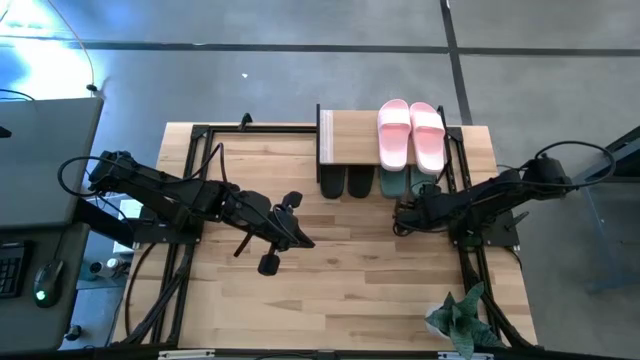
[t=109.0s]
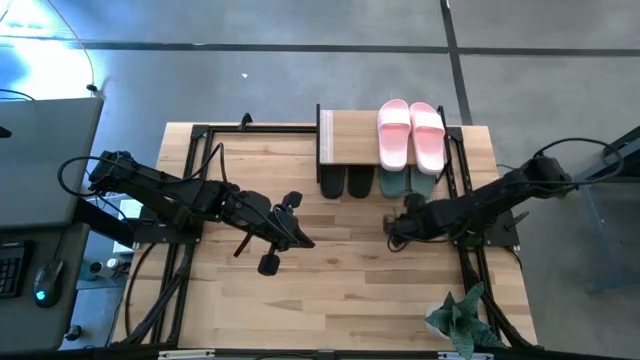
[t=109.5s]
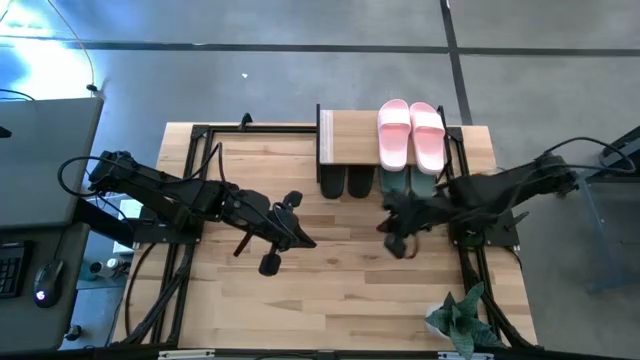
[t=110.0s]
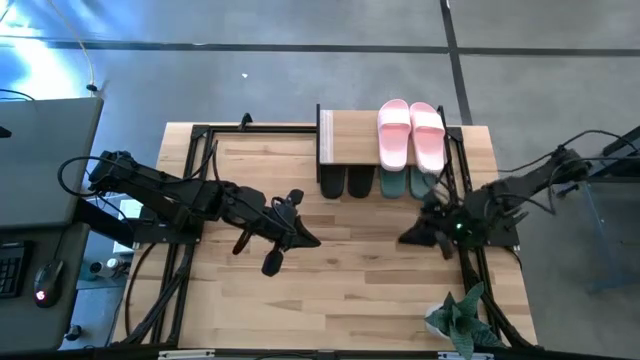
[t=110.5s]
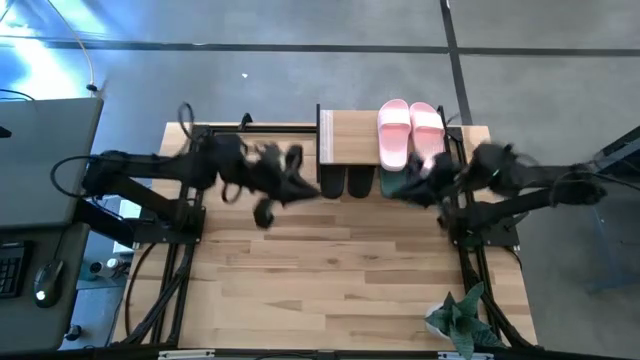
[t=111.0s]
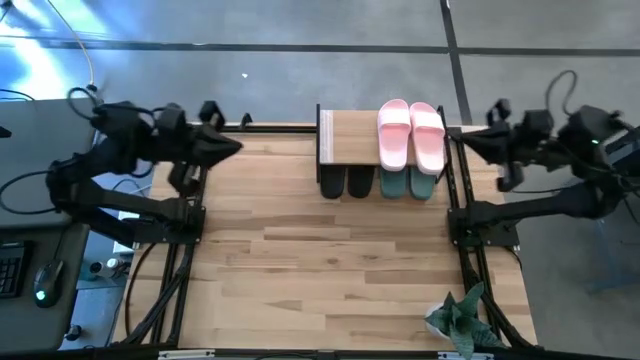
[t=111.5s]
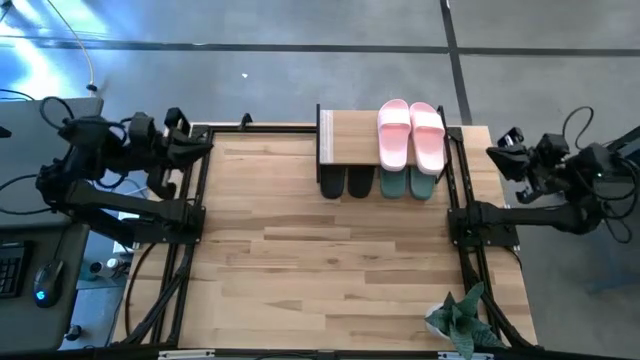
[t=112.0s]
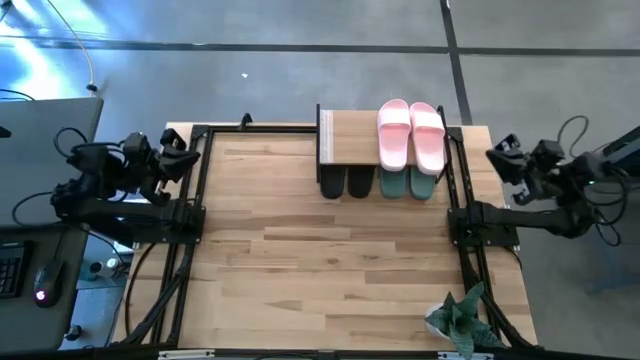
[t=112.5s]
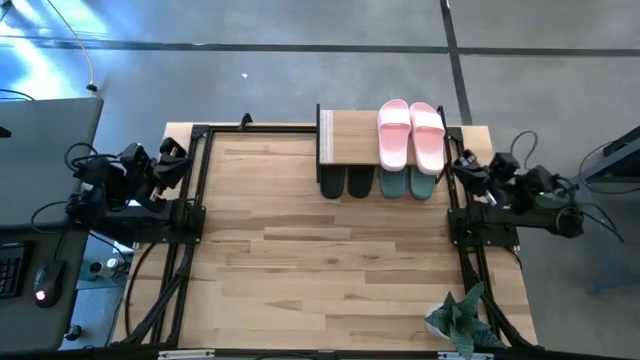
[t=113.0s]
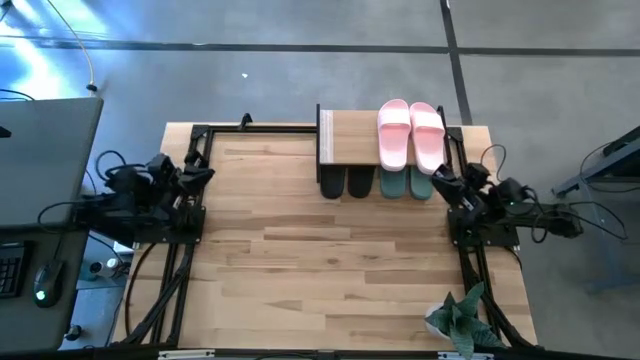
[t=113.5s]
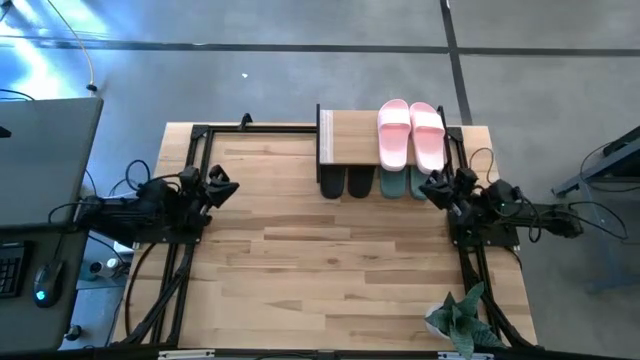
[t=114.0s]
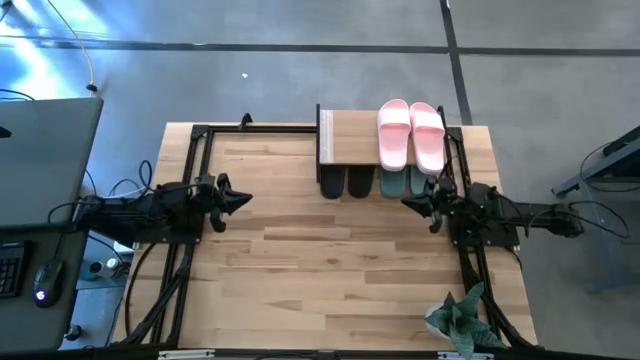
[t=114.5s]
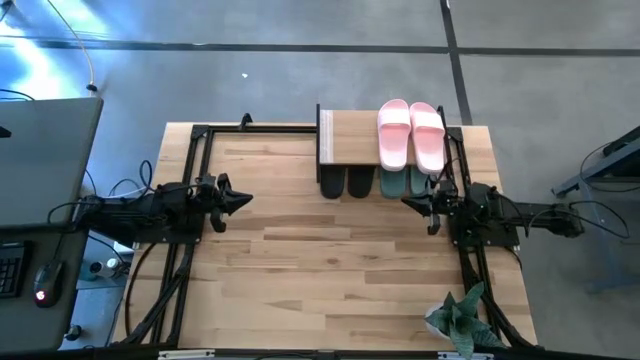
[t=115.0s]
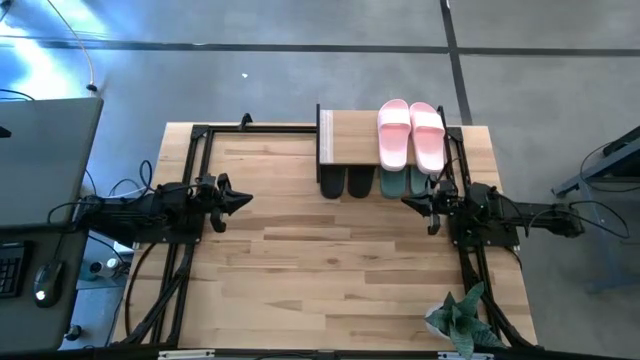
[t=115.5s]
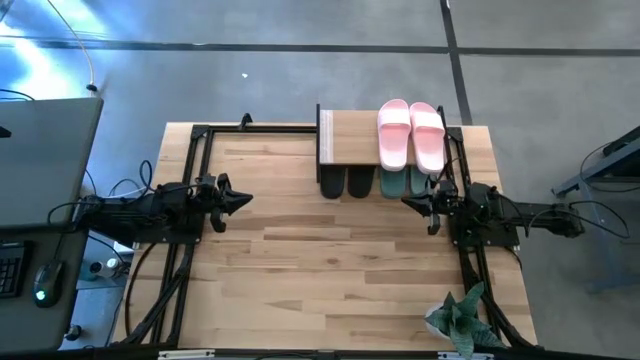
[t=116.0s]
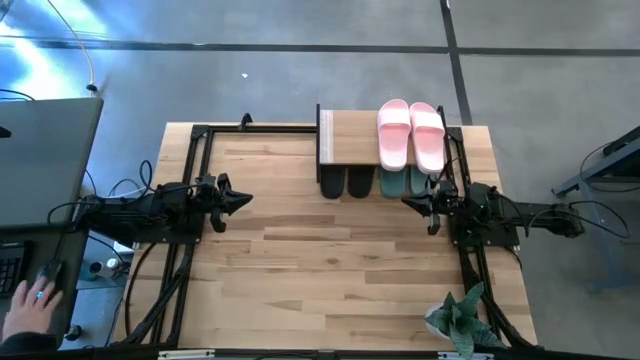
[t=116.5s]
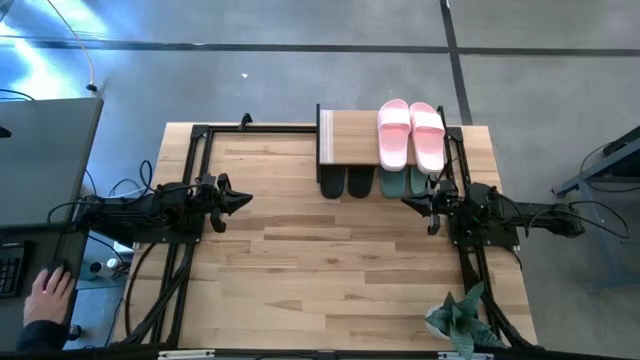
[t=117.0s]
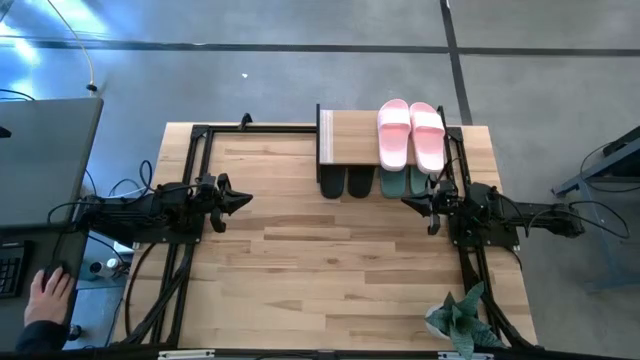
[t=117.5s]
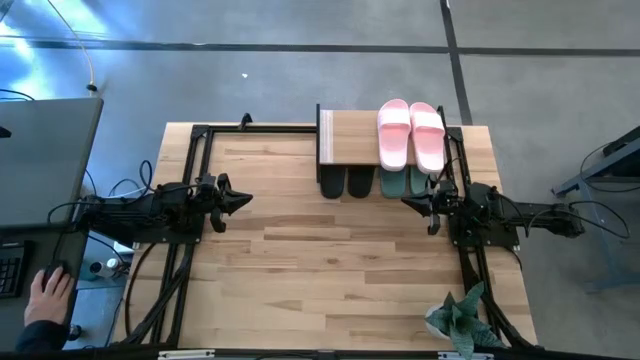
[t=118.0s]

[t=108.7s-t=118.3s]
Task: Pick and place slides into the shelf
Return to Home Position

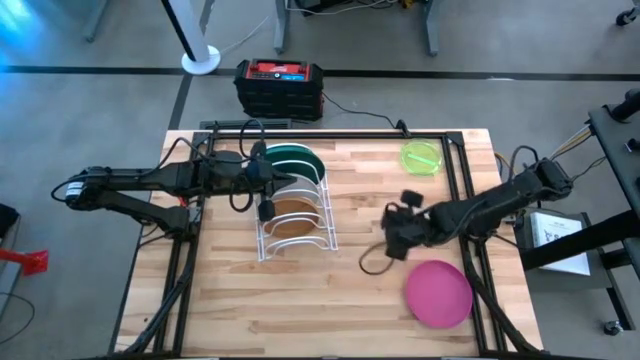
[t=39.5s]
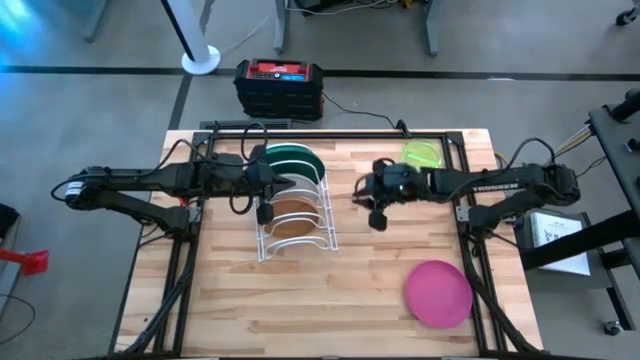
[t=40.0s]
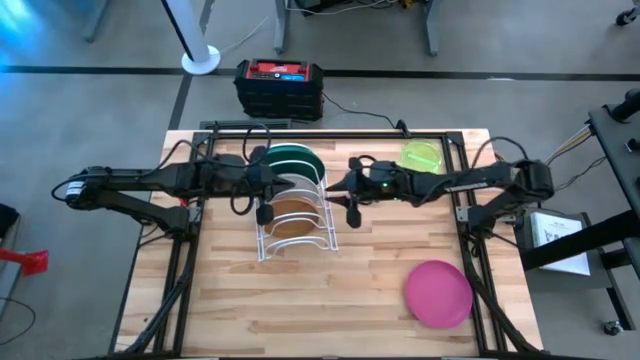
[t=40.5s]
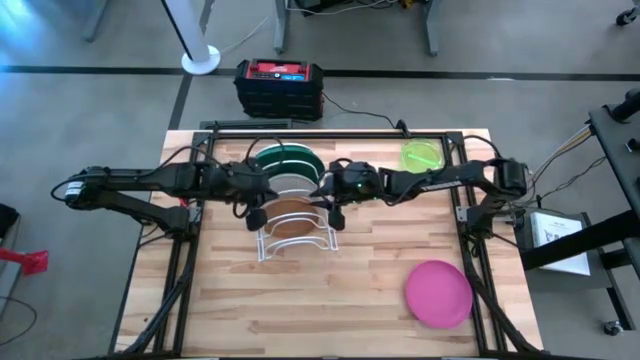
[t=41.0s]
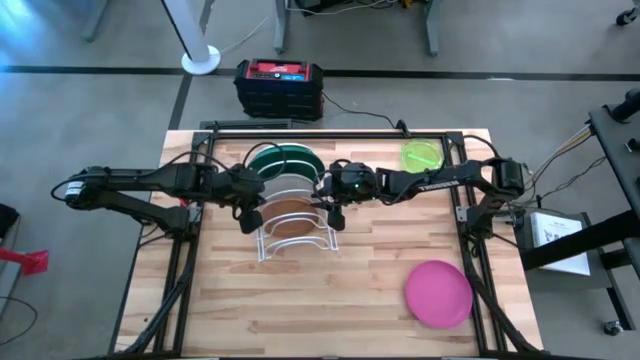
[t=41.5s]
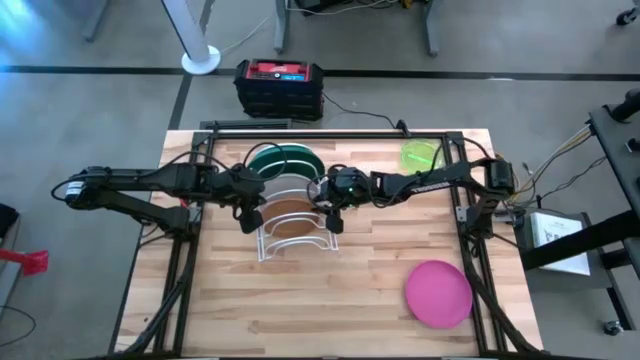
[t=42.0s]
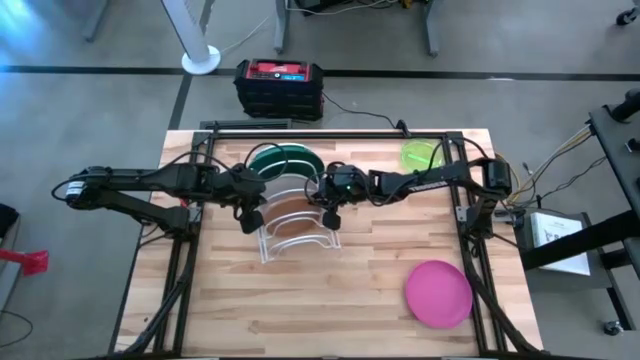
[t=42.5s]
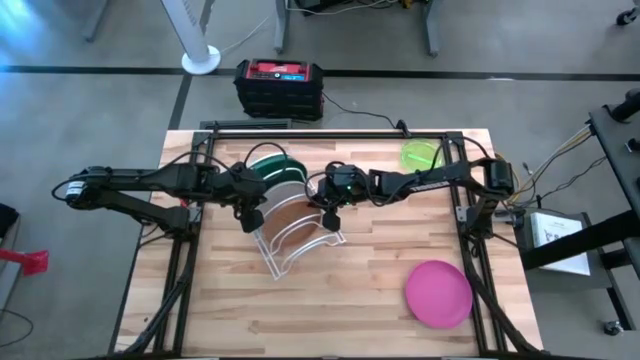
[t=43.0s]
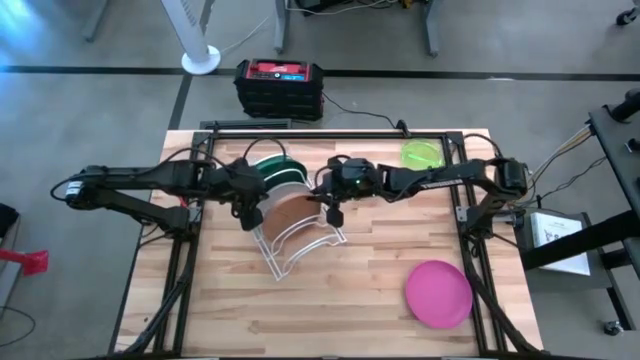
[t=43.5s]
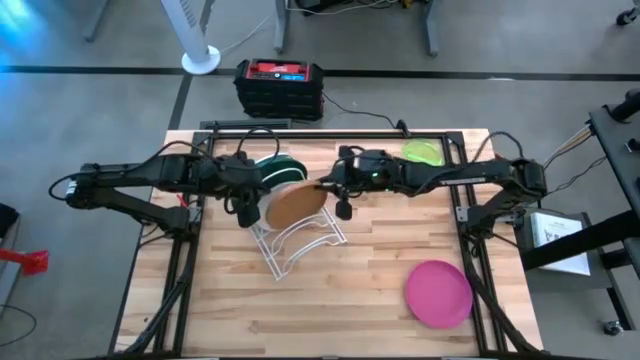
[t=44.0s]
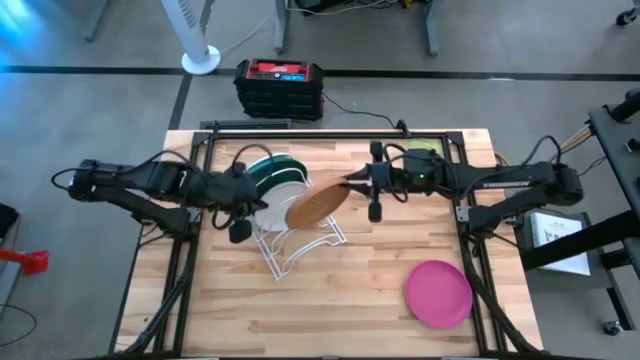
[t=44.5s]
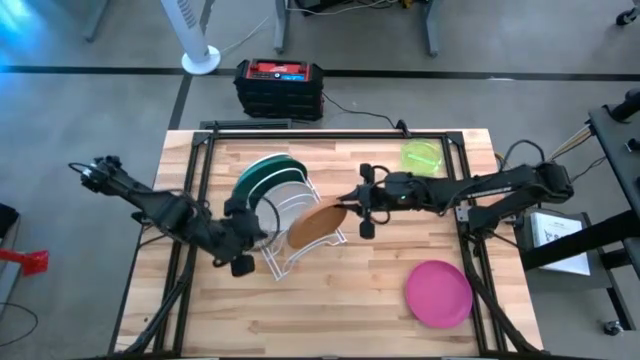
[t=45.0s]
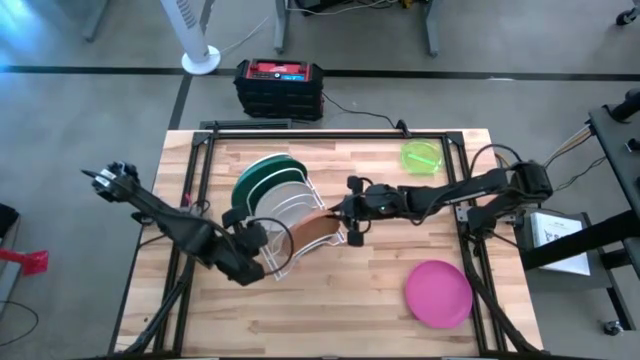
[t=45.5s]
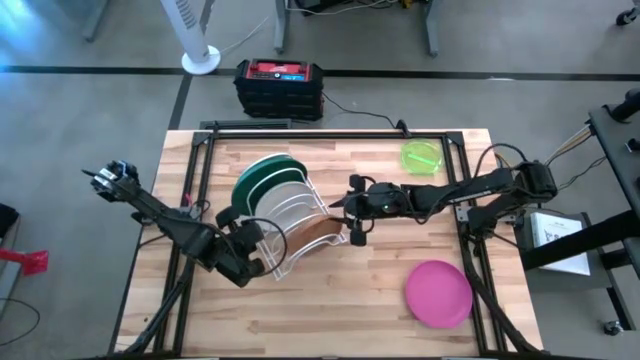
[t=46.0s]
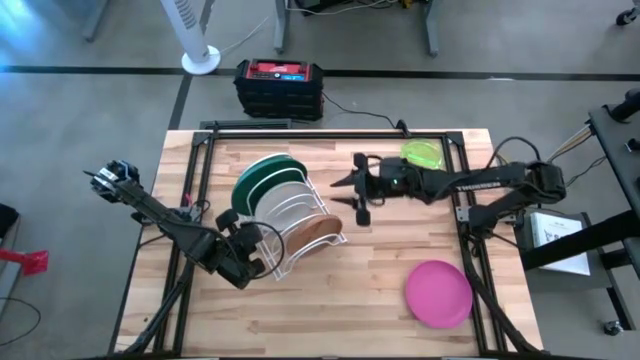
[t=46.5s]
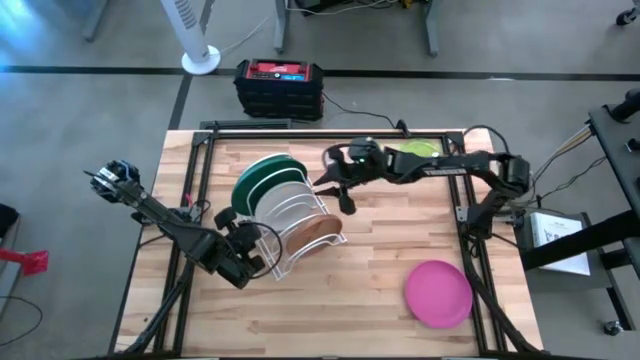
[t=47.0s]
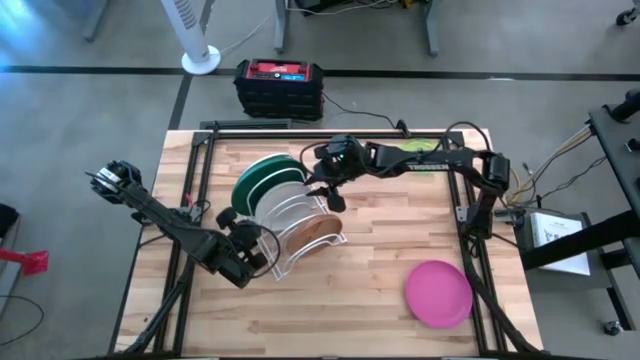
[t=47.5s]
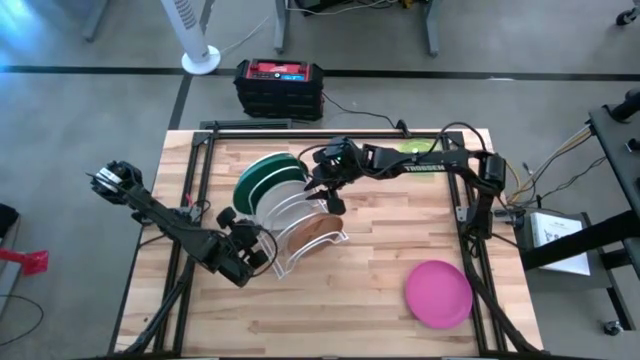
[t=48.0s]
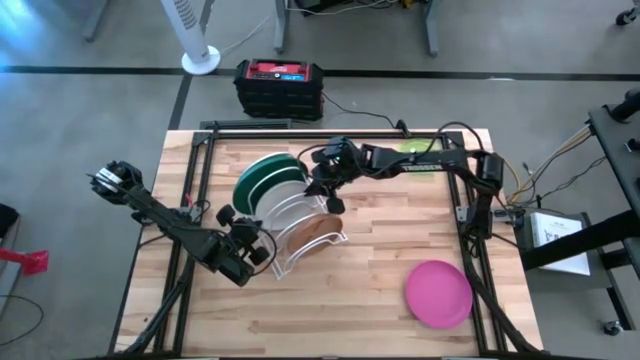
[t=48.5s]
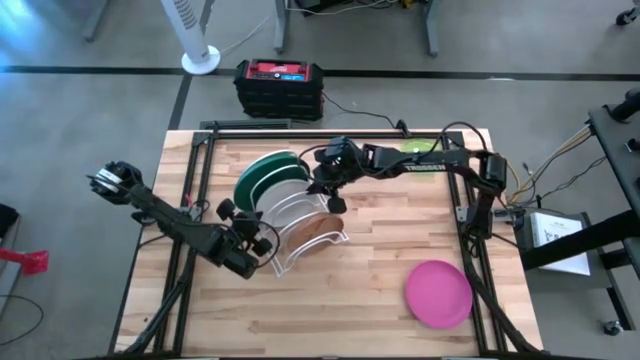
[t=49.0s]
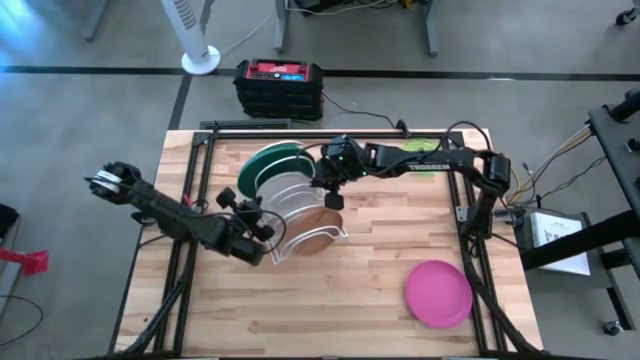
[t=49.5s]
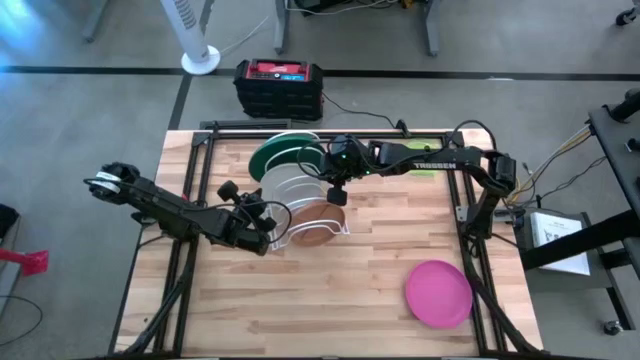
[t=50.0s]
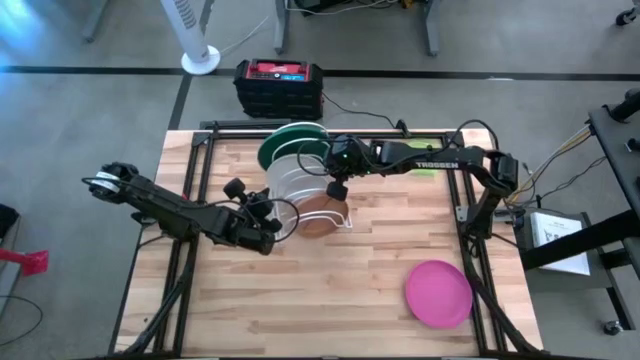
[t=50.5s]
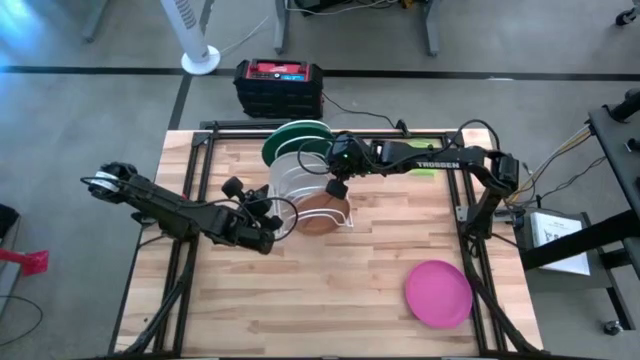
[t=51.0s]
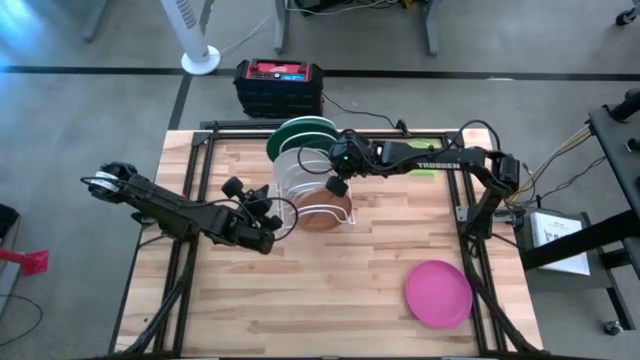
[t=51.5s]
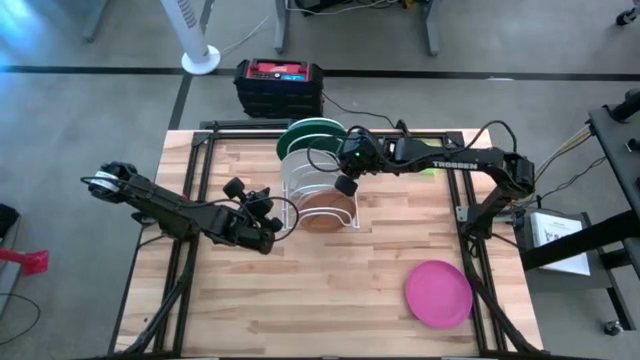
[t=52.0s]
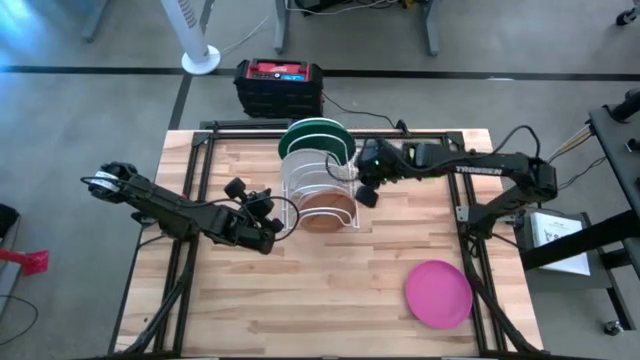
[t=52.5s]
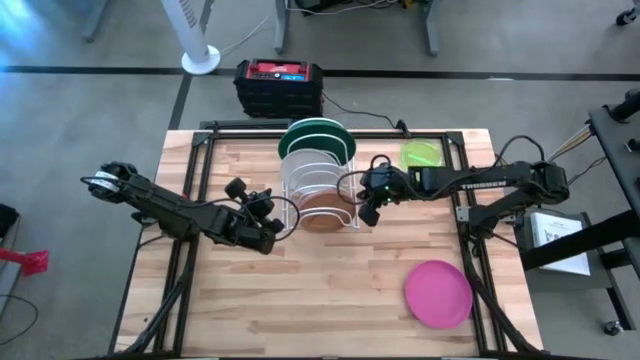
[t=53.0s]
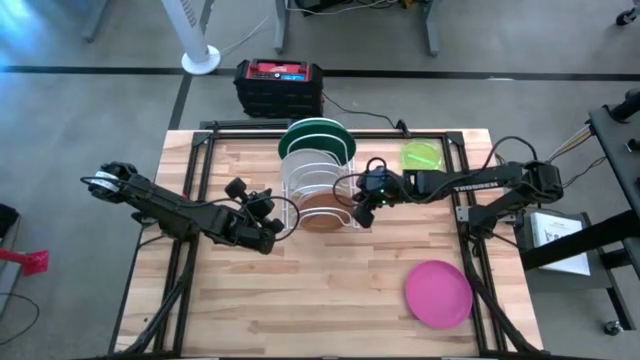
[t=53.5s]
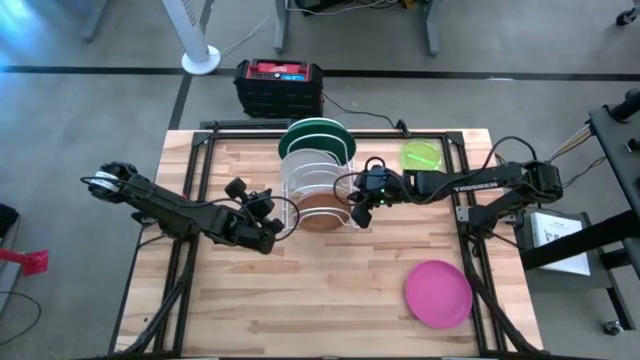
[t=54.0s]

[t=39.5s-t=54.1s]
Task: Sort dishes
Put the brown plate in the dish rack
